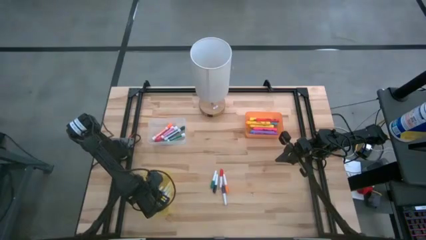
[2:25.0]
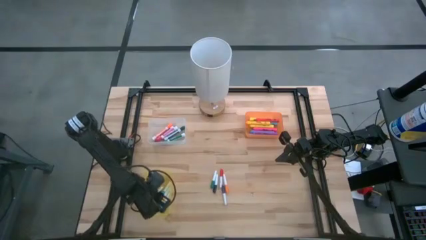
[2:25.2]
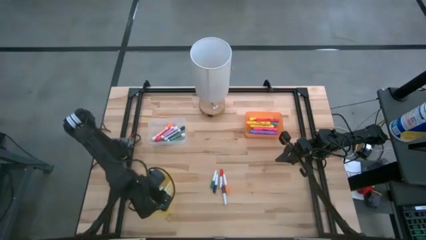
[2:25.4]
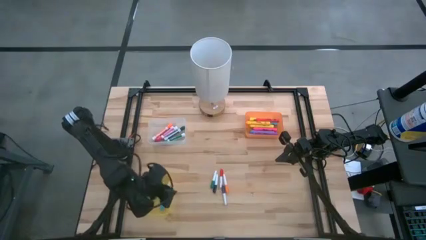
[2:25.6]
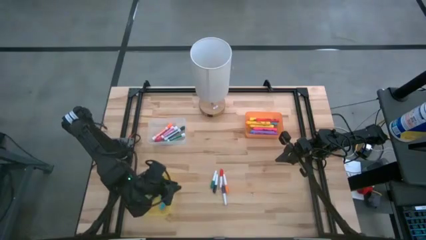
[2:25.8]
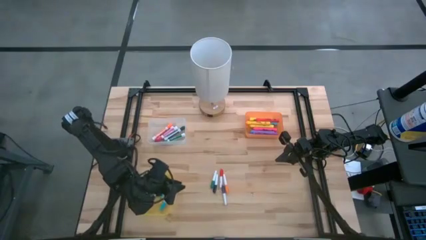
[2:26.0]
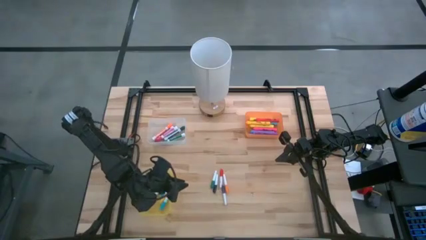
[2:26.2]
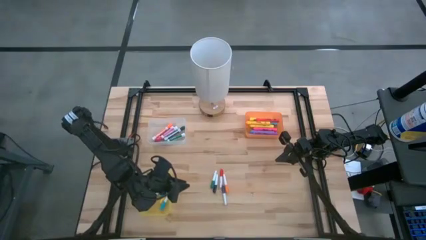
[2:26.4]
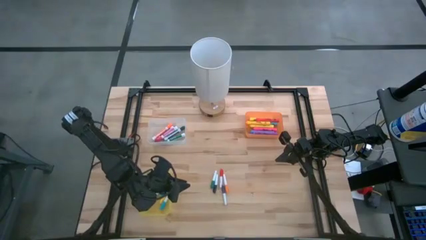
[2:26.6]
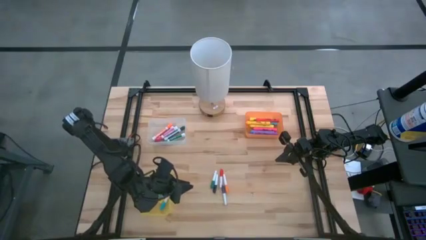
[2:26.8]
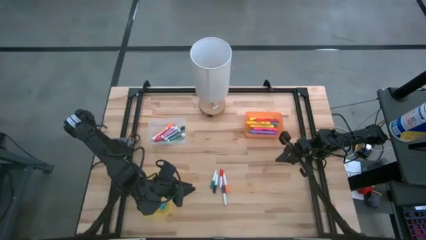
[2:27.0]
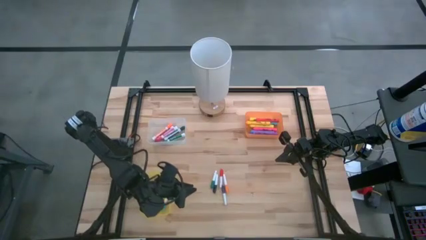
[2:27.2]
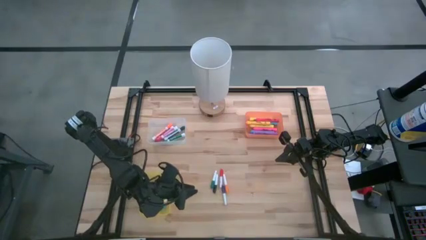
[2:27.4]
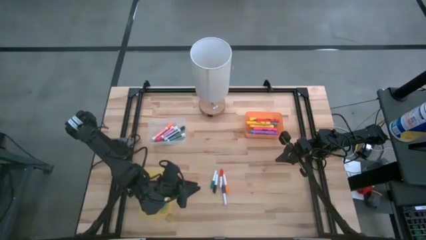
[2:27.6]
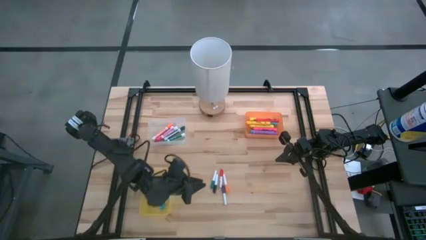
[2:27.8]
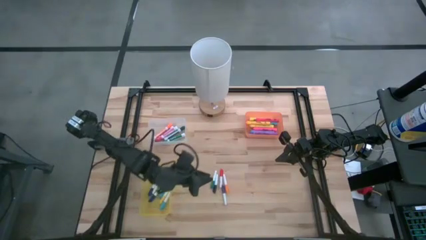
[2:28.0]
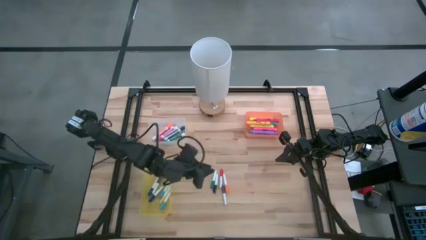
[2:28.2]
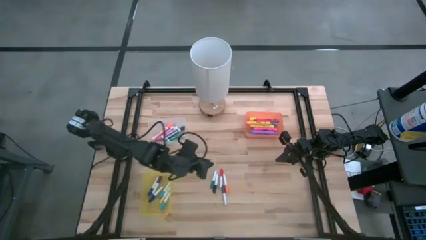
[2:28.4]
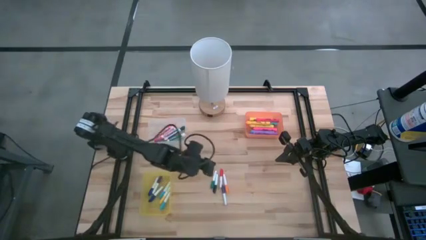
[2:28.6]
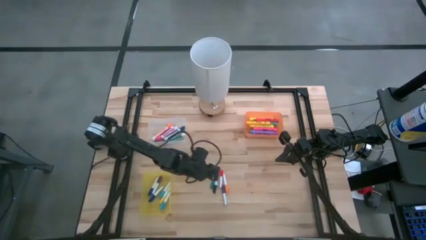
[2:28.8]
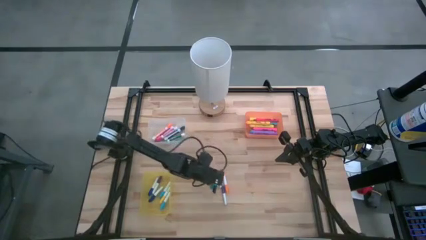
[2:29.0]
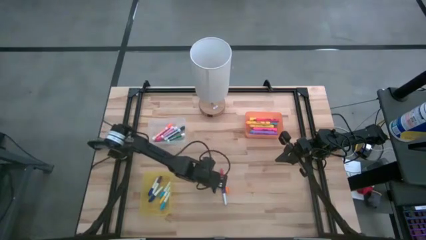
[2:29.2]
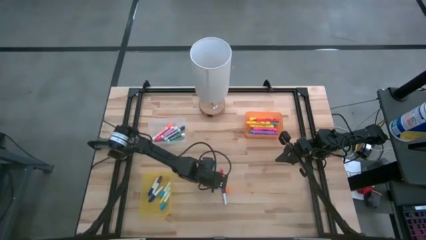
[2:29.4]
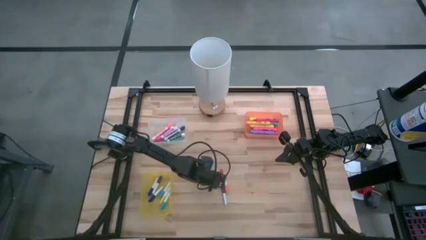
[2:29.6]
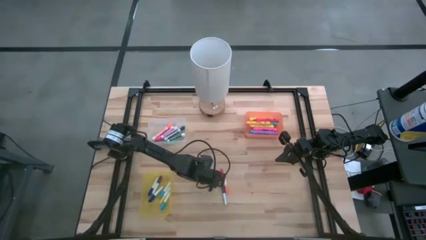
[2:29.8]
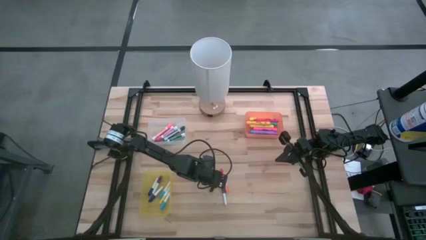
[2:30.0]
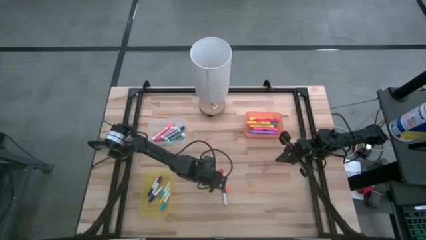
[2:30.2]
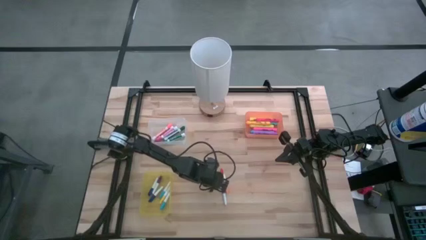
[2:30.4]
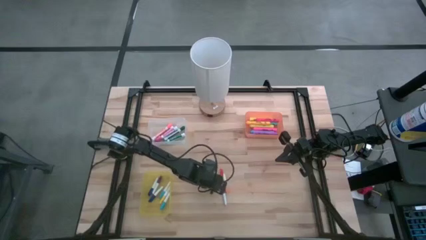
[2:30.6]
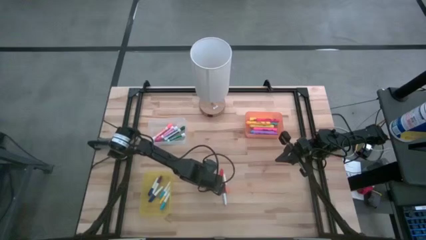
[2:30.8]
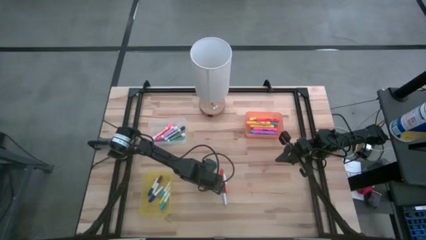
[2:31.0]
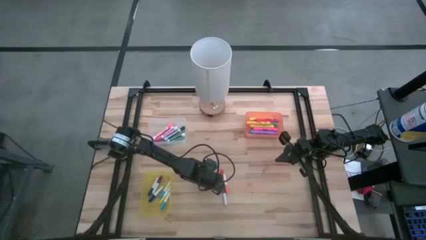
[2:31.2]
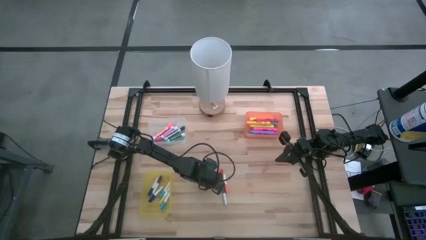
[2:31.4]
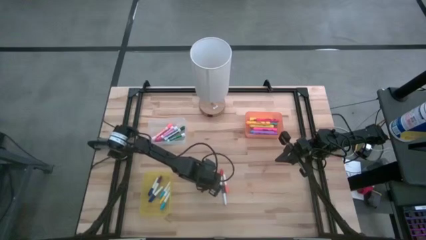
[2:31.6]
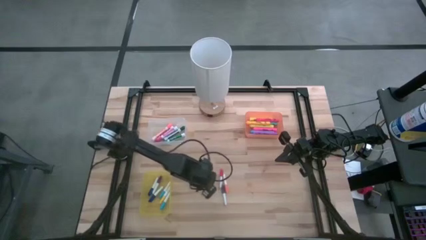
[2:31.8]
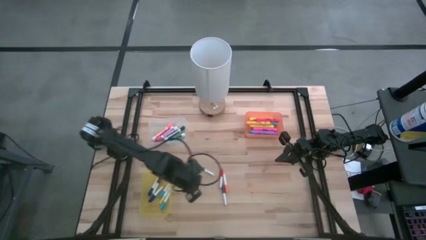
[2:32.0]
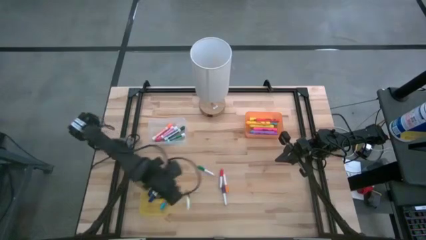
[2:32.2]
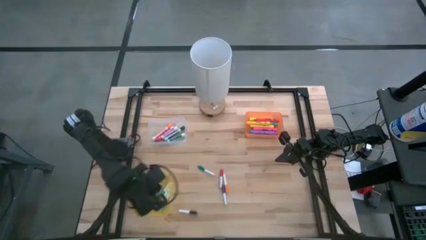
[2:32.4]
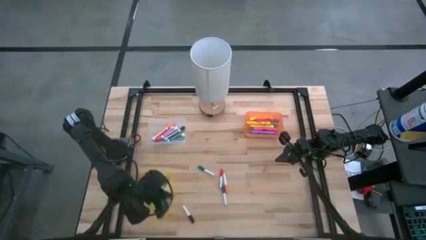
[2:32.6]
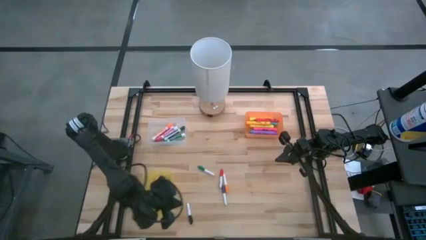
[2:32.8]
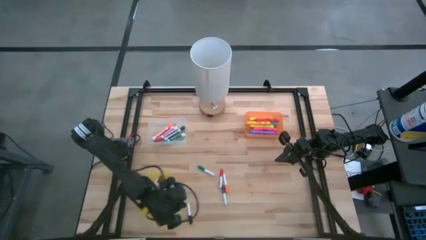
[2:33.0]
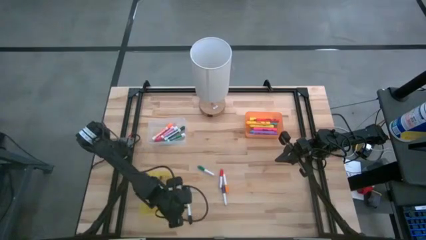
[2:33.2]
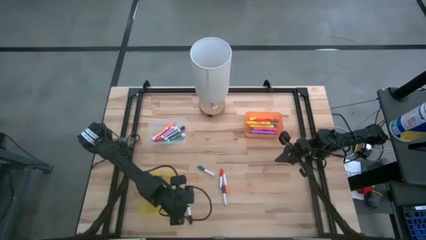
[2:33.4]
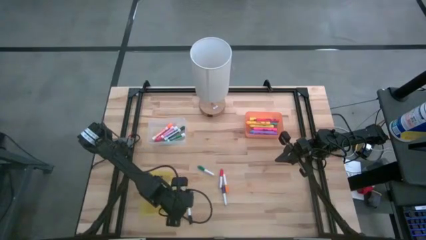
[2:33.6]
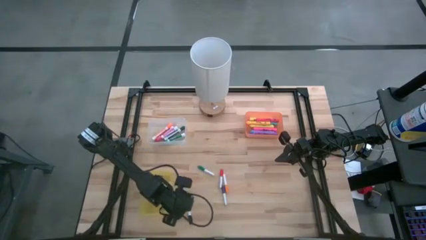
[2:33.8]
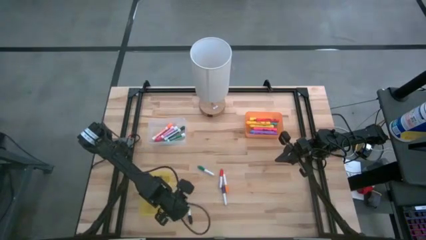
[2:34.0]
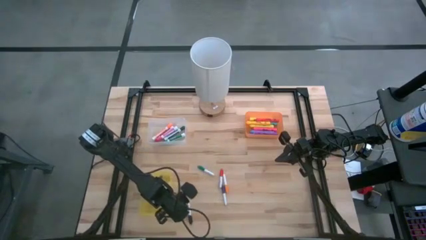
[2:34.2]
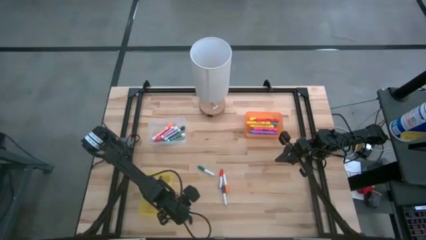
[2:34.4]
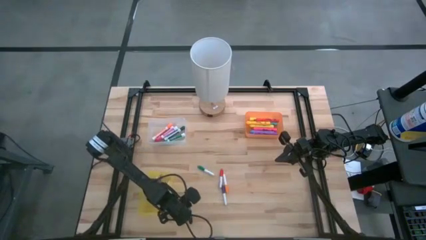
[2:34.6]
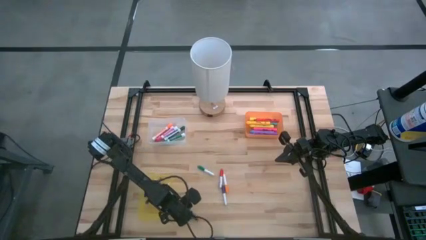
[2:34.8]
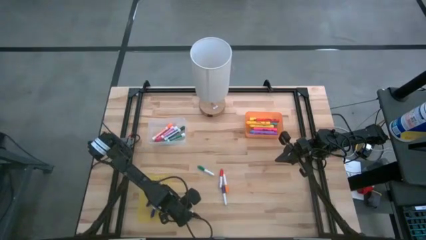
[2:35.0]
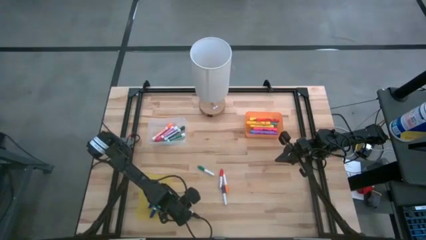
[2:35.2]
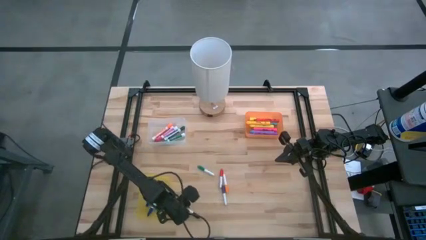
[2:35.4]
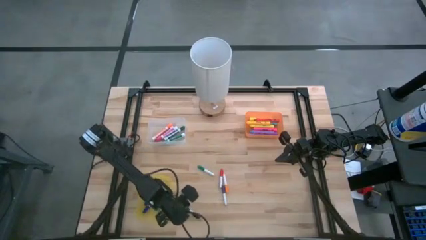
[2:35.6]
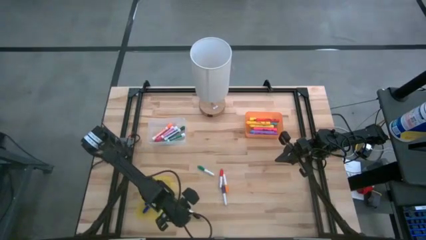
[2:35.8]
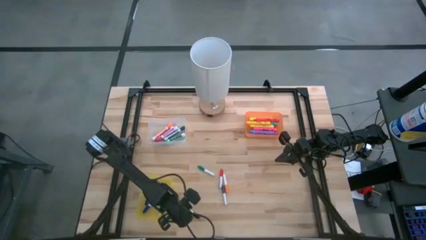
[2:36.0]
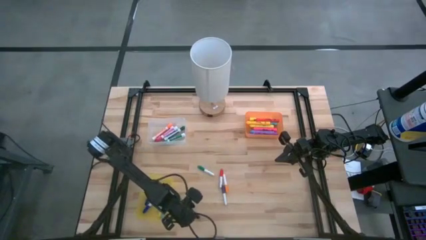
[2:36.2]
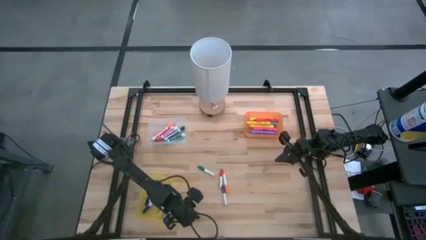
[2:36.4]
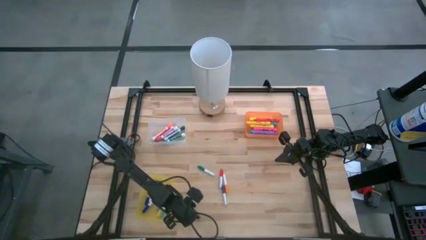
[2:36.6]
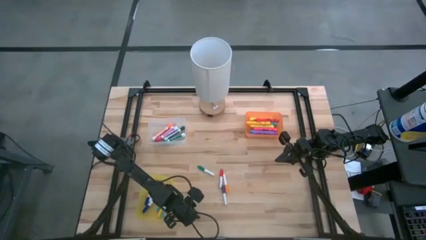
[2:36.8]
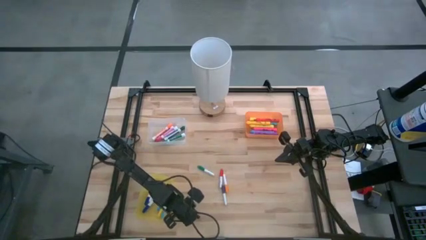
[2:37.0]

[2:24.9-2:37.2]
Task: Pick & Place Markers
Put the small black highlighter pen into the yellow bin

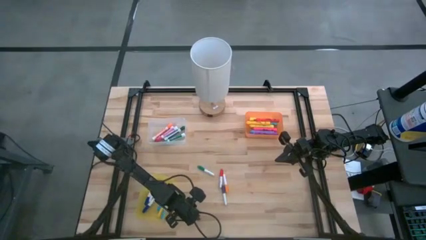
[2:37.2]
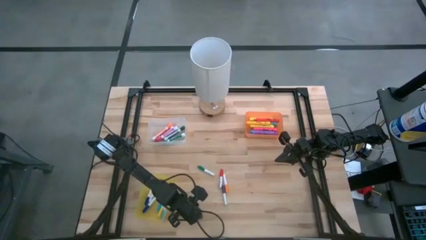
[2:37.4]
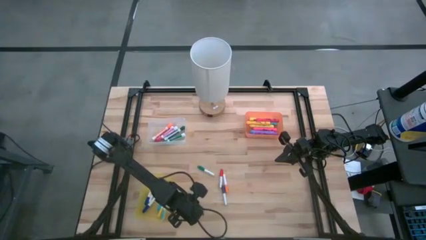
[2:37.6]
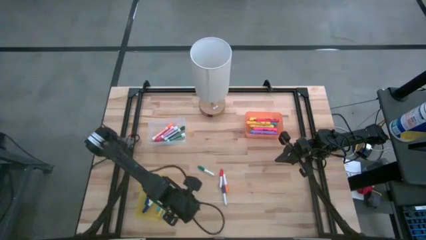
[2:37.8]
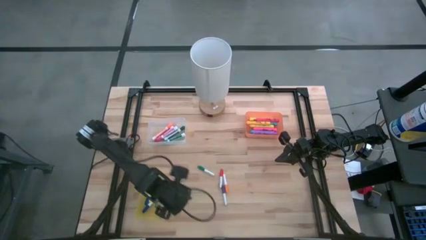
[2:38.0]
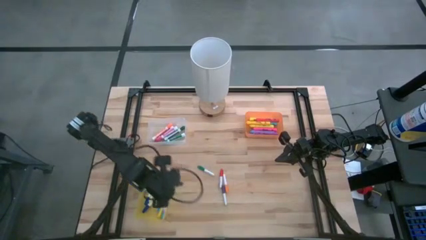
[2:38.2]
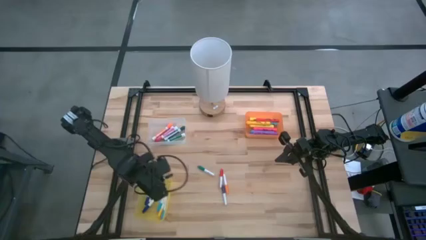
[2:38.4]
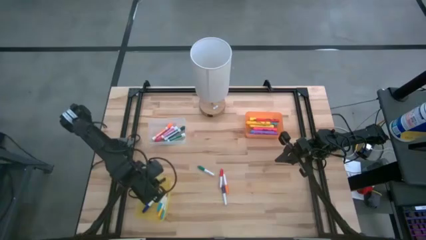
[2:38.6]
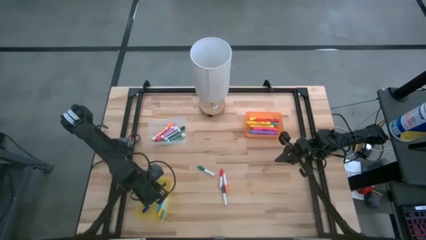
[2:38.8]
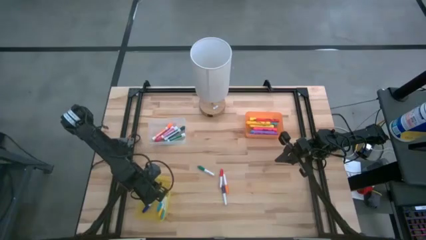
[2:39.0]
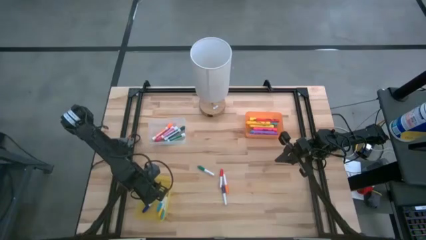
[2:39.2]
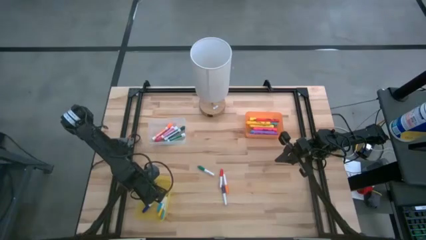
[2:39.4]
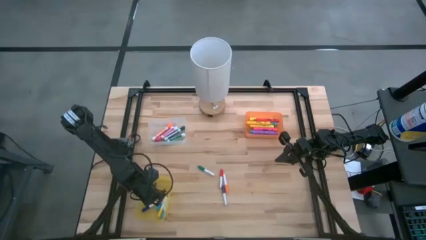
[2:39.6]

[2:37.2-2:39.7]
Put the small black highlighter pen into the yellow bin
